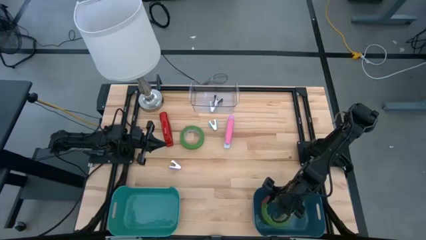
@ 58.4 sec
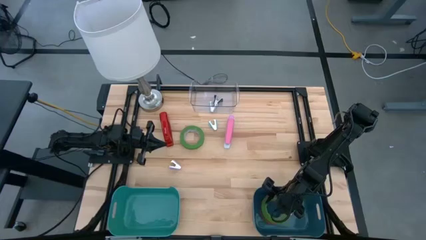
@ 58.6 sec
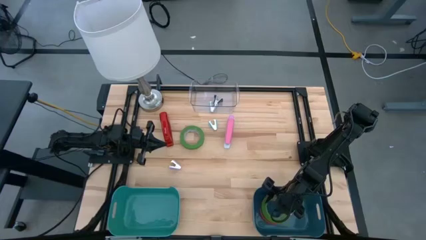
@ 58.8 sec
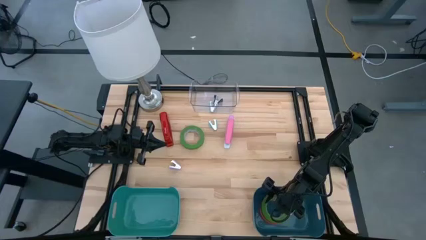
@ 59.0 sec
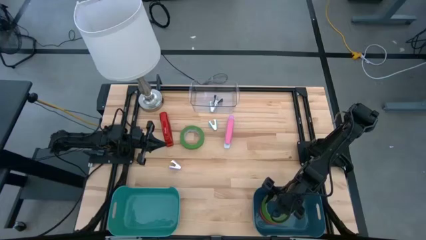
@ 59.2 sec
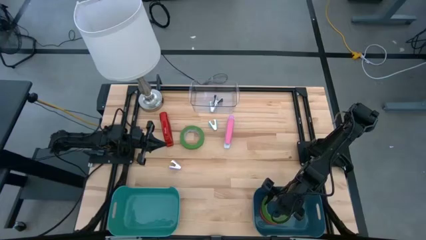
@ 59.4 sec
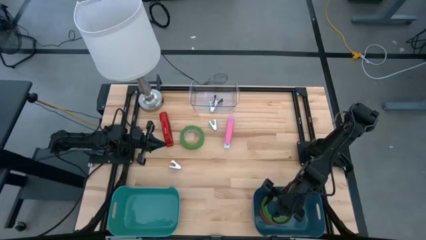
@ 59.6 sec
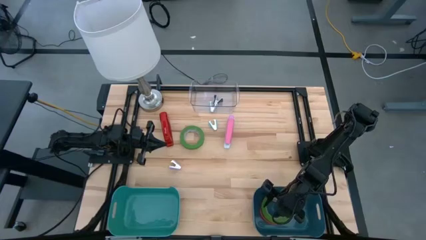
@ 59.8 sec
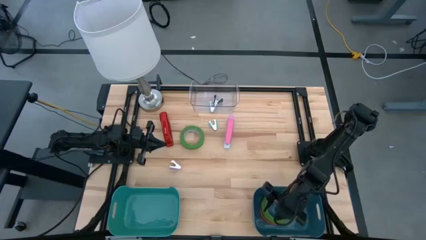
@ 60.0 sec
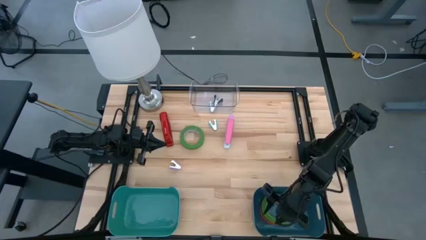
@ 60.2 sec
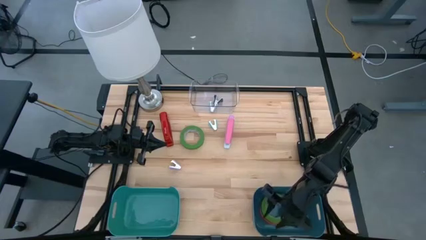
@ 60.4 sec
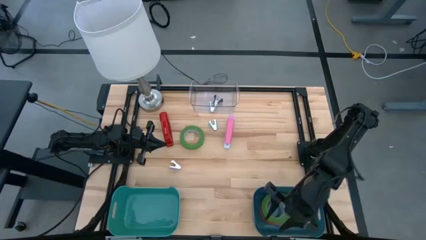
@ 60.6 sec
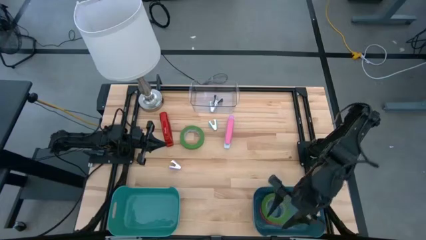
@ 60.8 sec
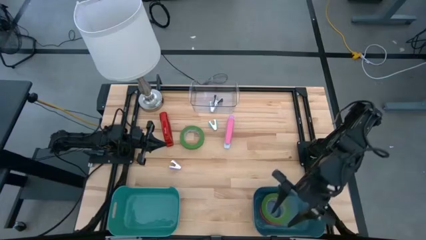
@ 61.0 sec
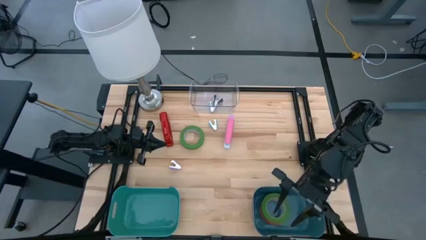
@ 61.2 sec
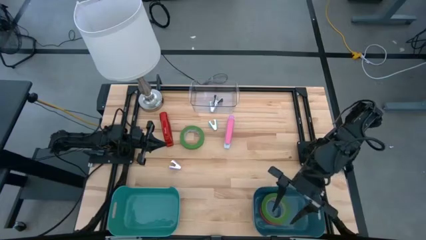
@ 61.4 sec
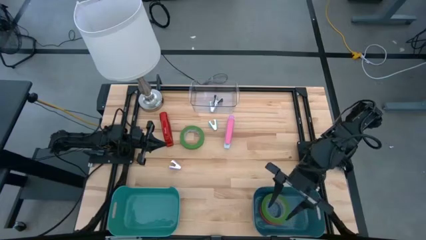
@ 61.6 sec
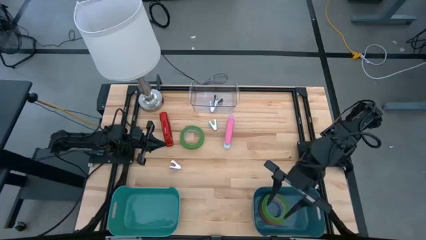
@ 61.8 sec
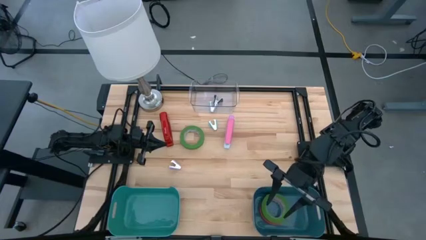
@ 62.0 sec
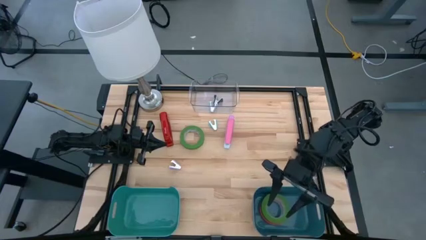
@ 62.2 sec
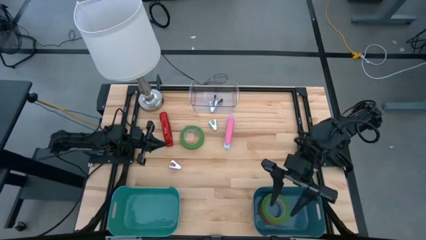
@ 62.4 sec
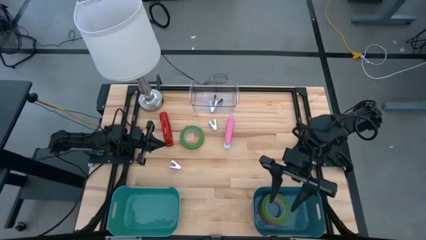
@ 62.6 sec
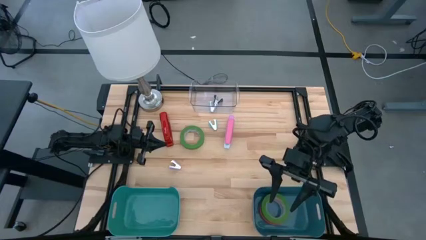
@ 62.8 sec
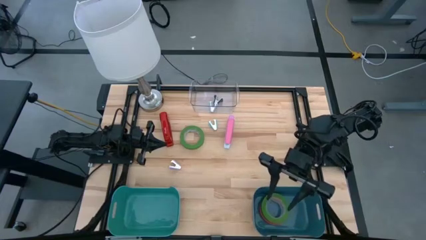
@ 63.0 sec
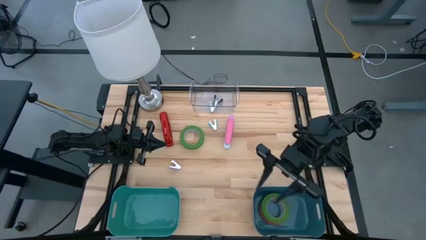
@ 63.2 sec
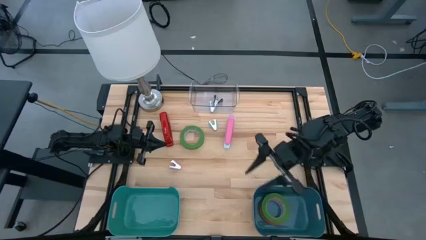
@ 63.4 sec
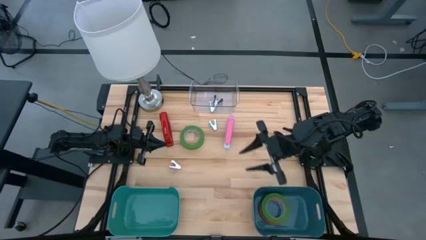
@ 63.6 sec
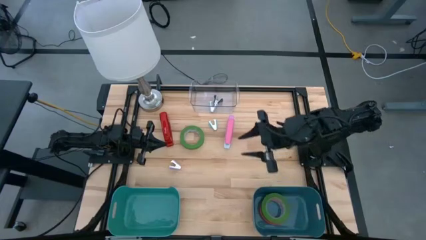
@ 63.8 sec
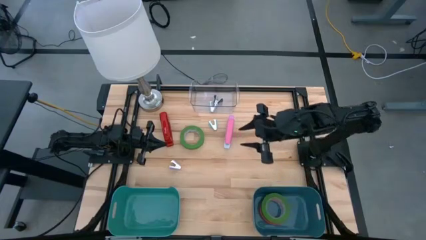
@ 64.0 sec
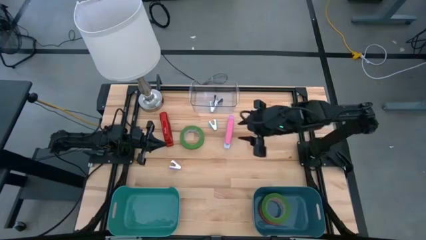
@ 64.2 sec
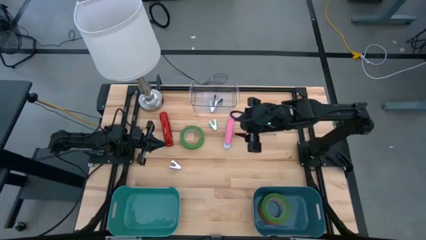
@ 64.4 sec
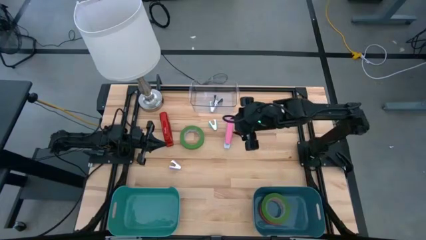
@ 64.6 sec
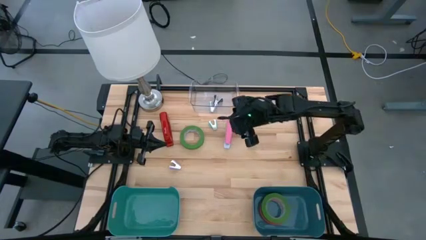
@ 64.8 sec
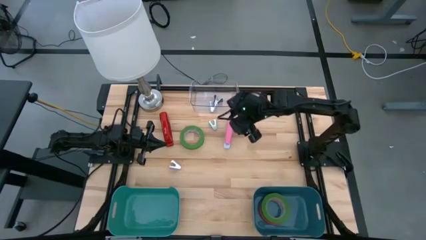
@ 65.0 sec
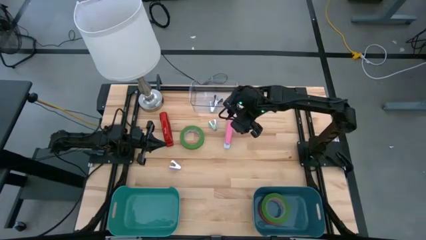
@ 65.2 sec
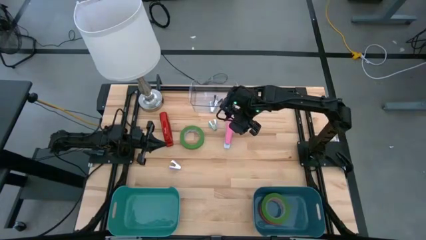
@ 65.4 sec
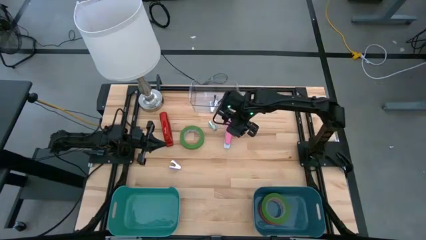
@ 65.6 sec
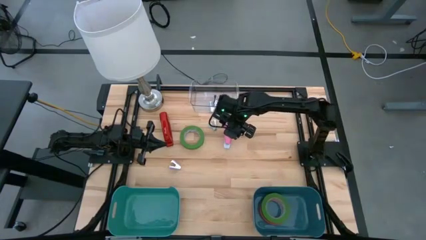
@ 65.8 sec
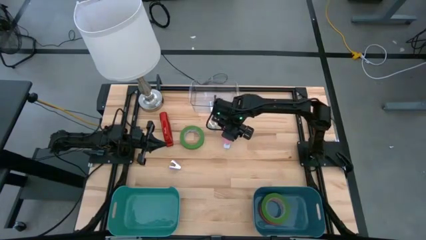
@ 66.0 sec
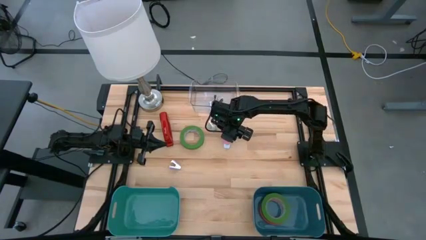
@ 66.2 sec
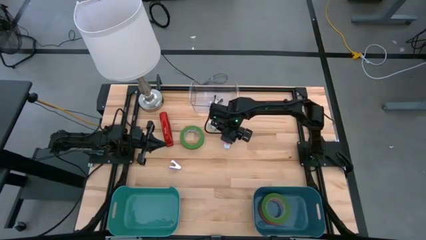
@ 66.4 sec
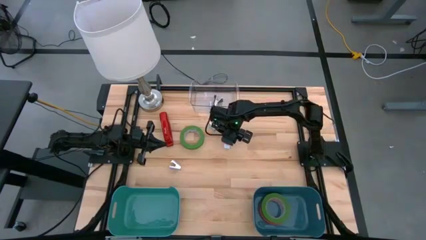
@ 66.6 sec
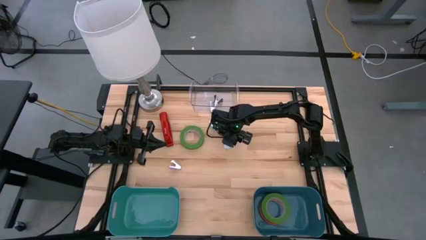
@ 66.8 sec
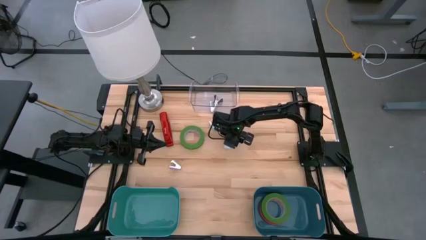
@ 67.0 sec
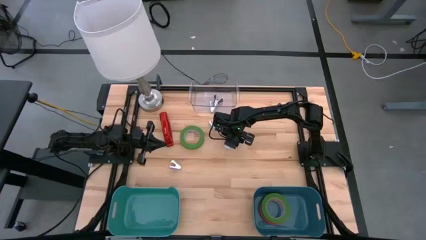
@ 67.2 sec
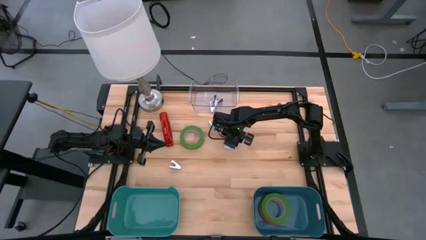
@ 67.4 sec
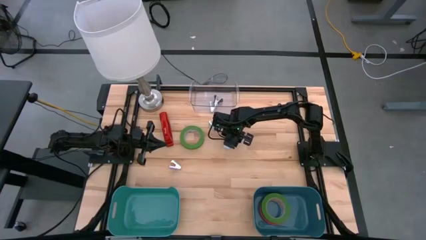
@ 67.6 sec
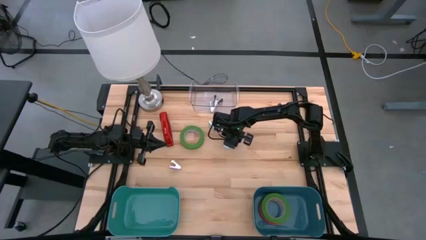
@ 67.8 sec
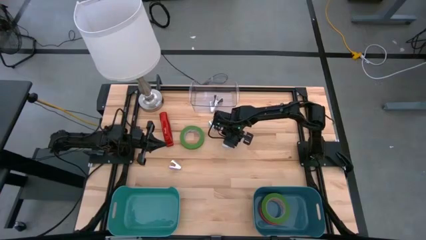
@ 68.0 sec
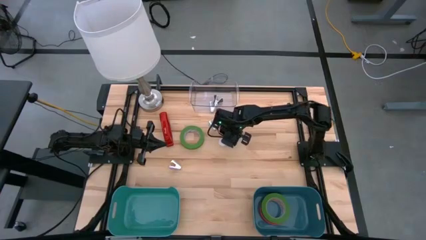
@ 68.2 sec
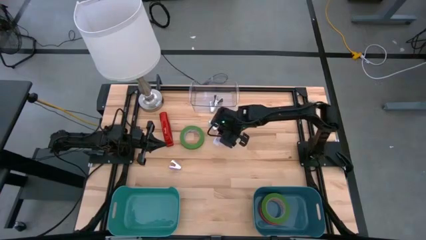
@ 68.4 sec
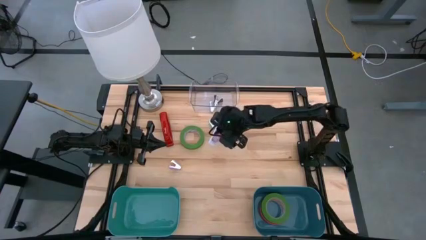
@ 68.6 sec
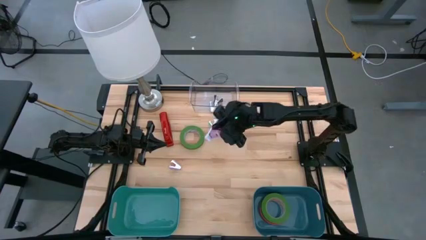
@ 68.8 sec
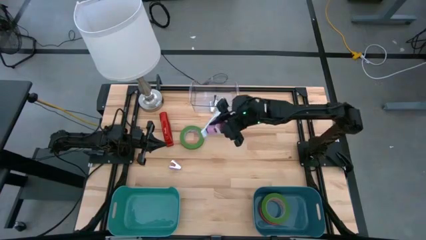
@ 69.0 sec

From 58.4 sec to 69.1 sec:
Task: Pick and place Stapler, Stapler remover, tape
Put the pink stapler into the green bin
